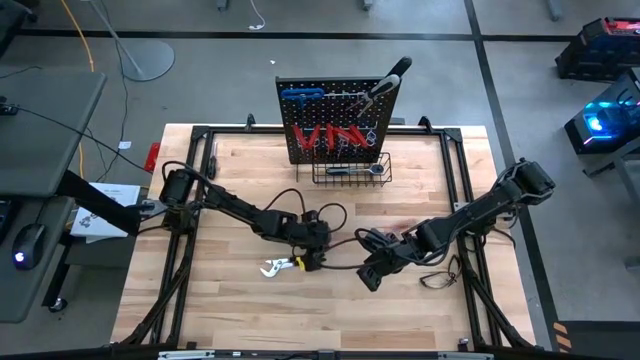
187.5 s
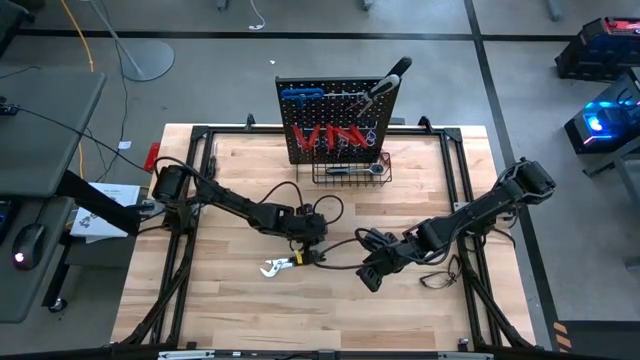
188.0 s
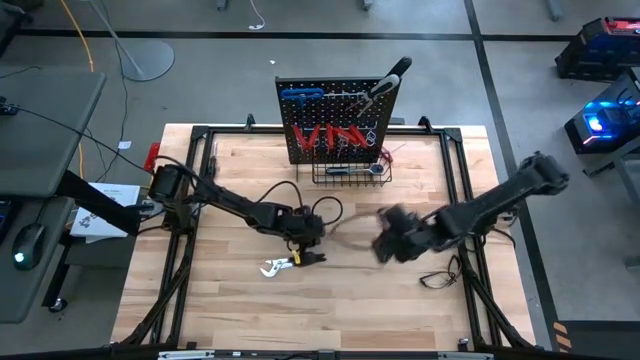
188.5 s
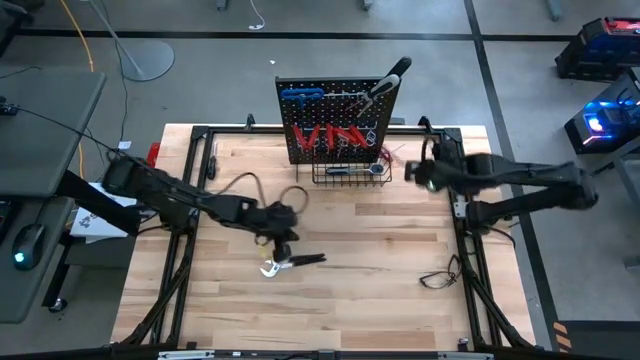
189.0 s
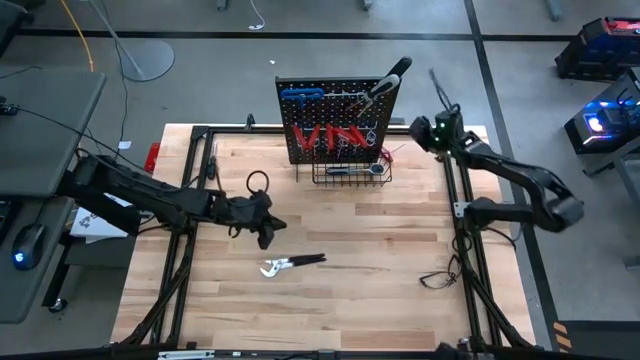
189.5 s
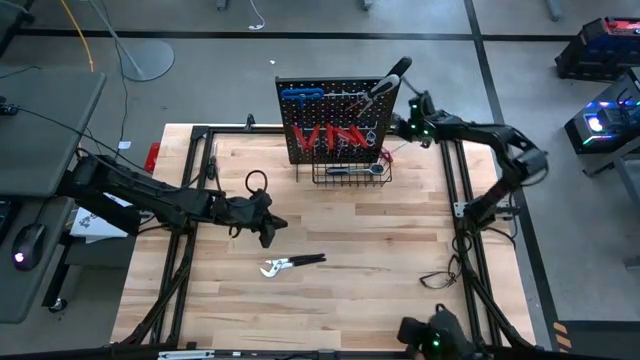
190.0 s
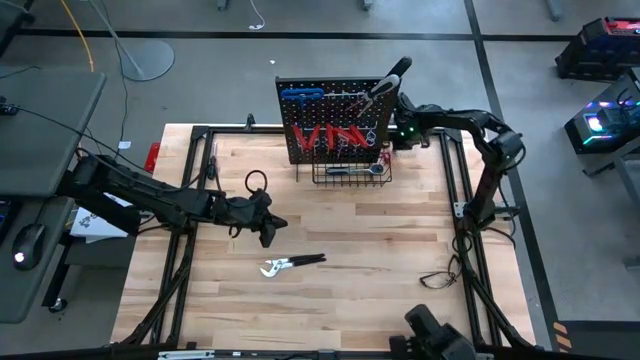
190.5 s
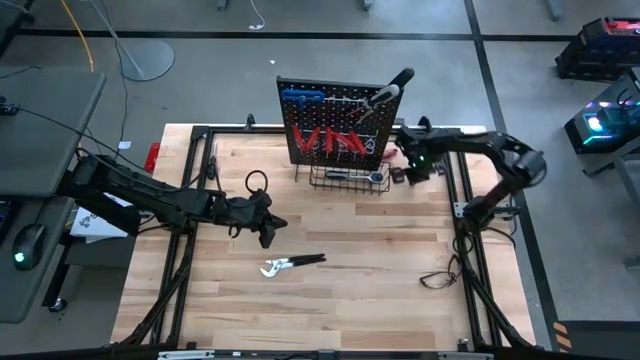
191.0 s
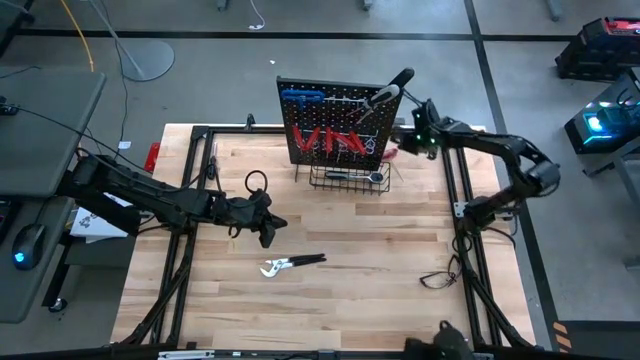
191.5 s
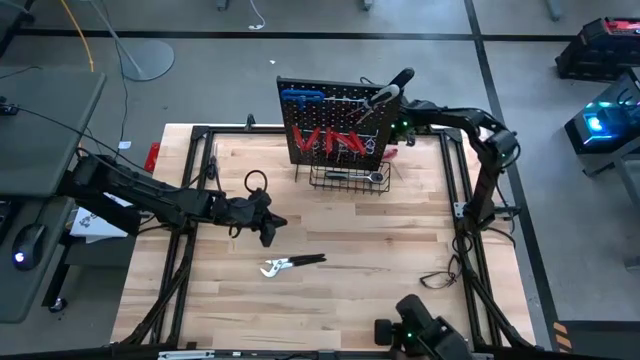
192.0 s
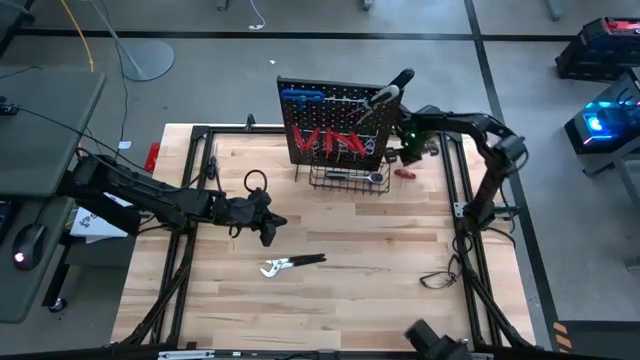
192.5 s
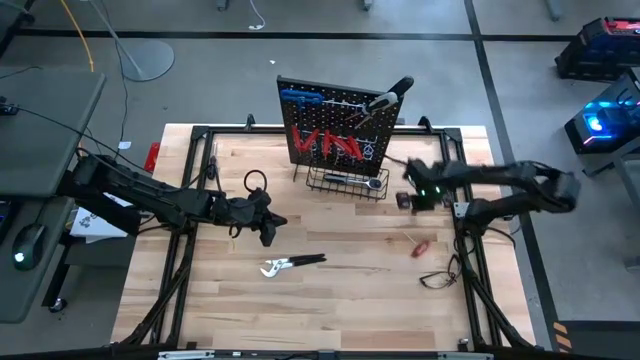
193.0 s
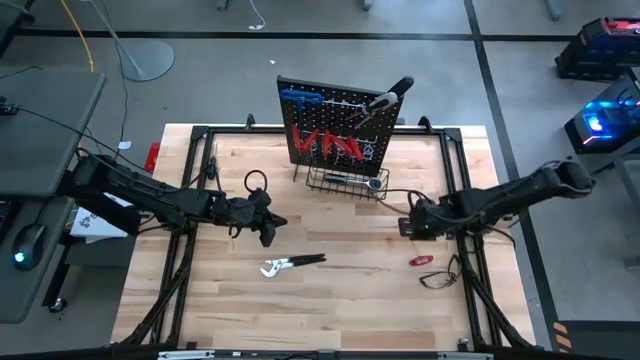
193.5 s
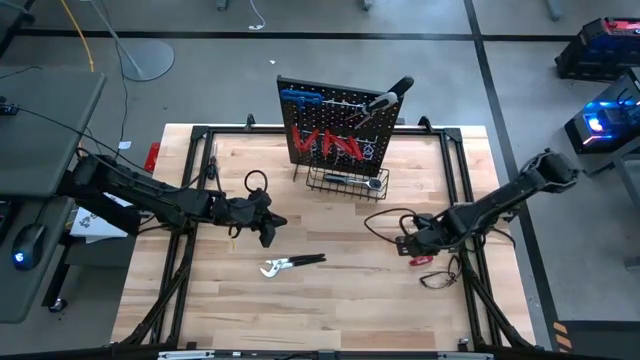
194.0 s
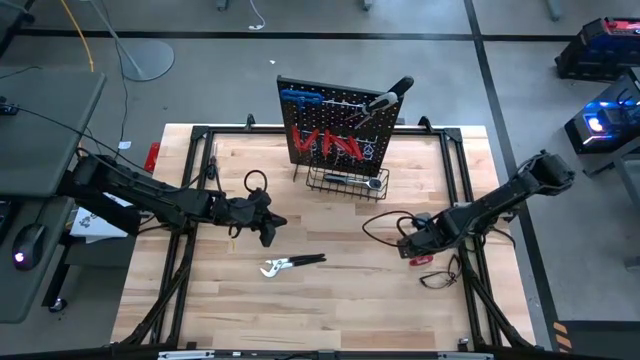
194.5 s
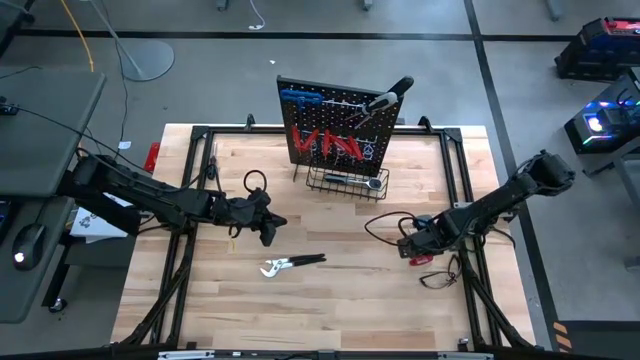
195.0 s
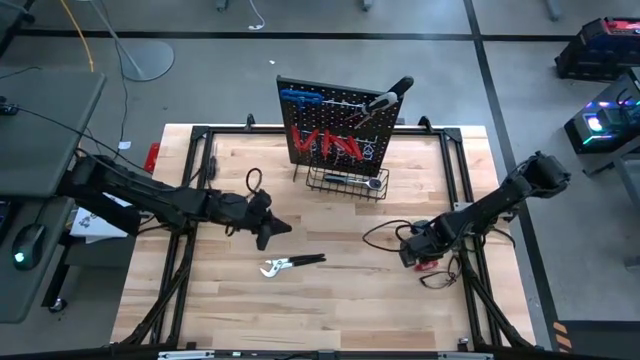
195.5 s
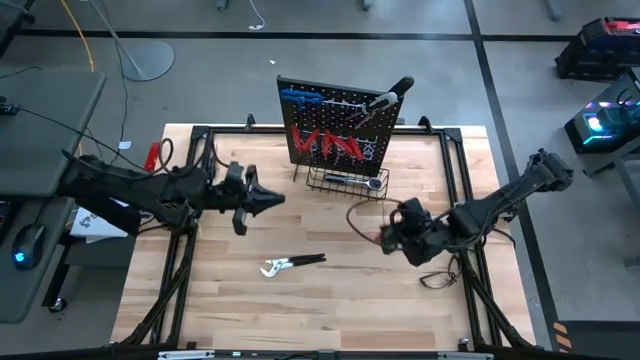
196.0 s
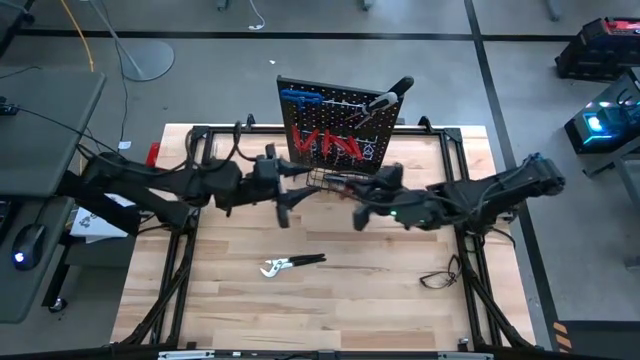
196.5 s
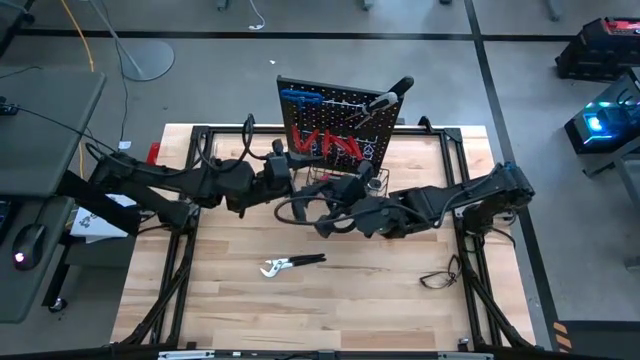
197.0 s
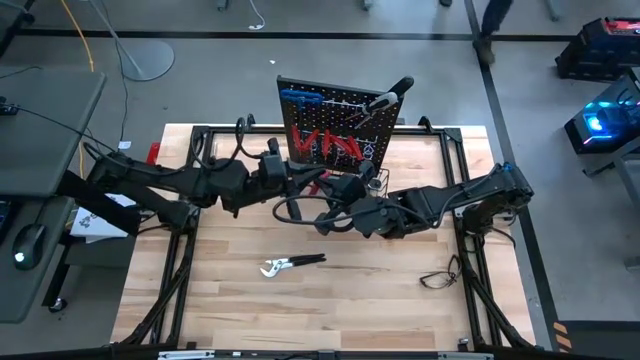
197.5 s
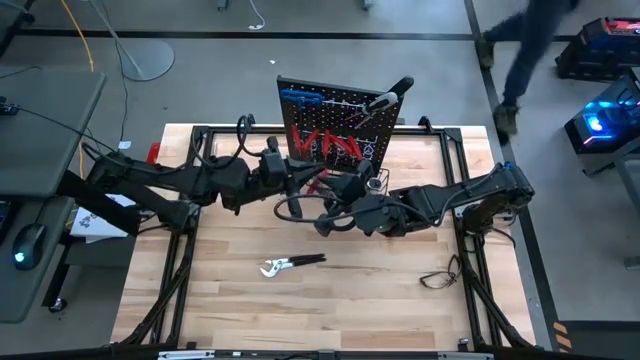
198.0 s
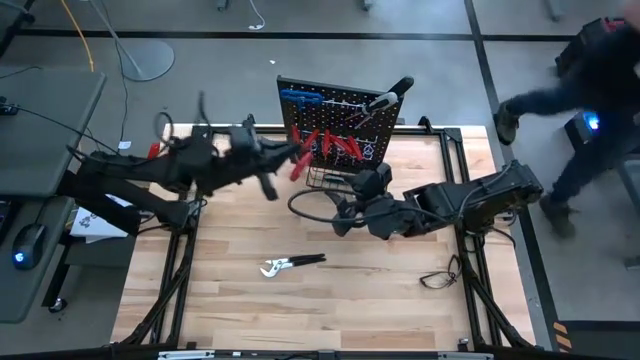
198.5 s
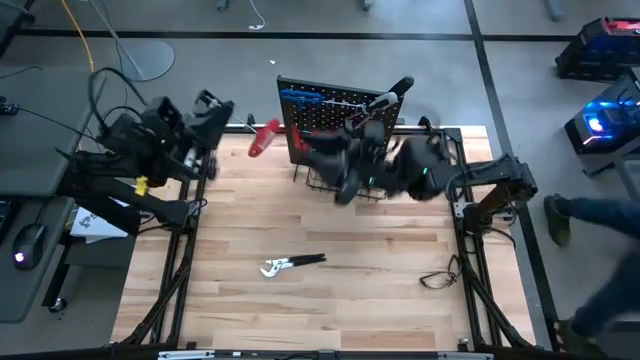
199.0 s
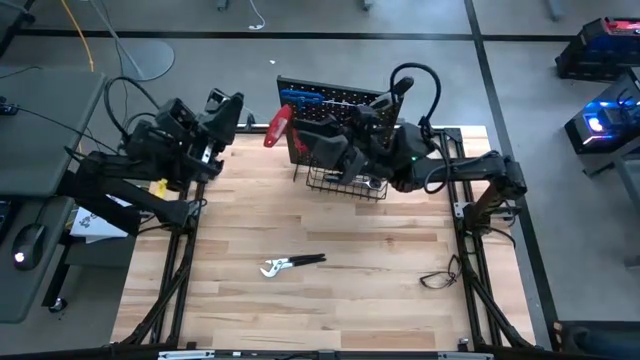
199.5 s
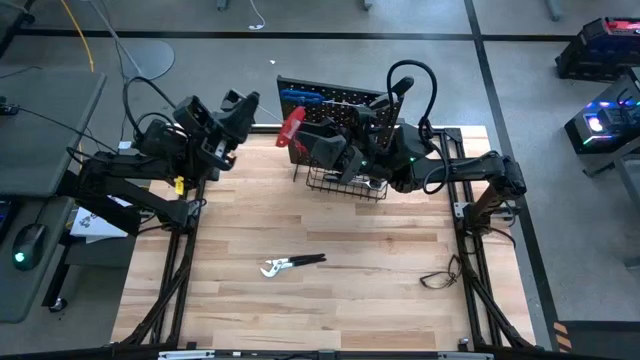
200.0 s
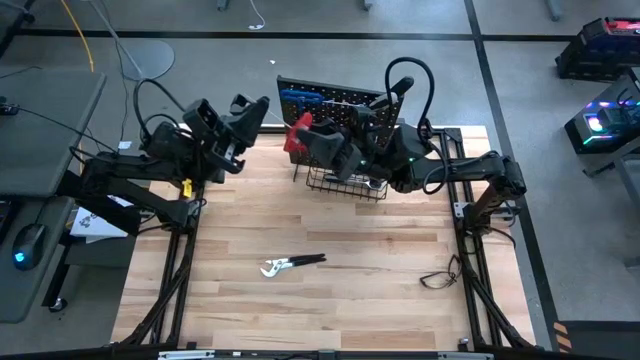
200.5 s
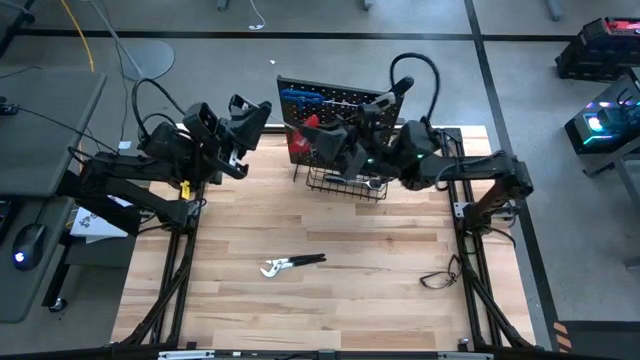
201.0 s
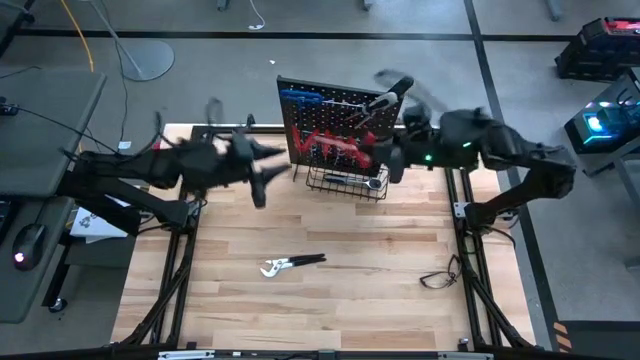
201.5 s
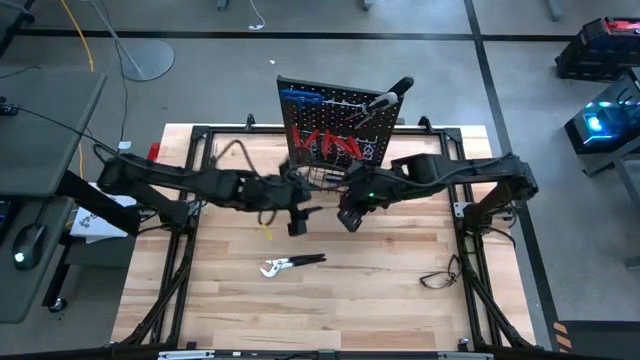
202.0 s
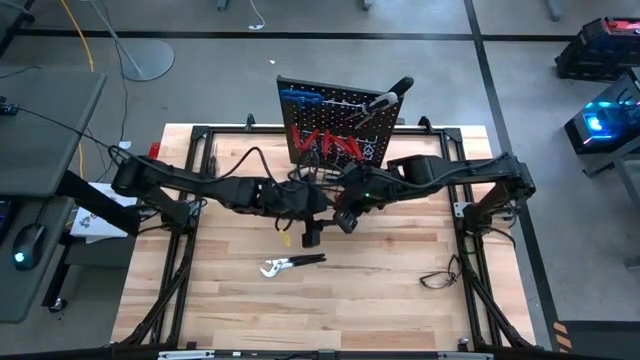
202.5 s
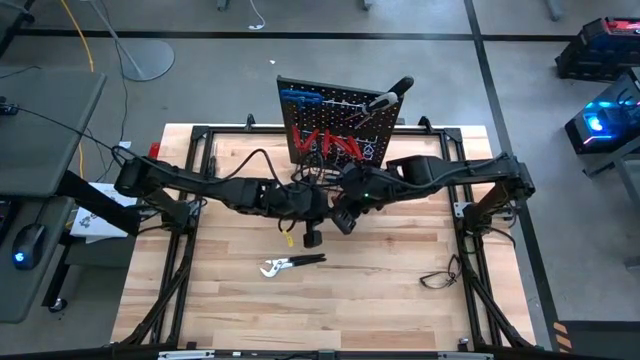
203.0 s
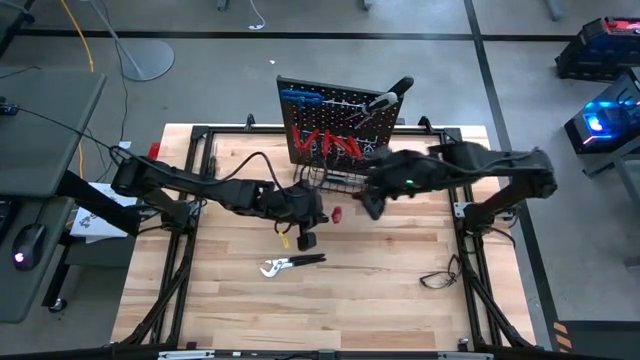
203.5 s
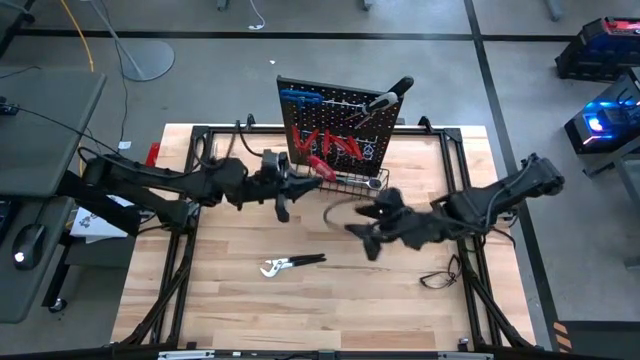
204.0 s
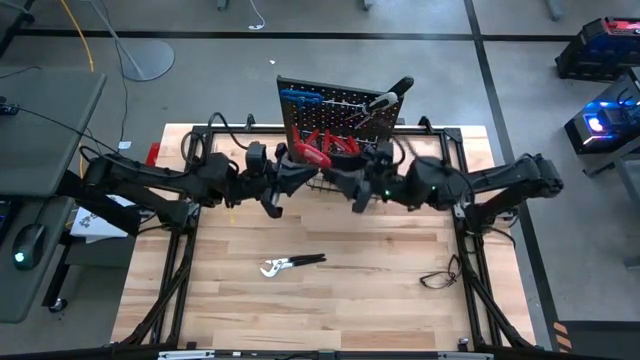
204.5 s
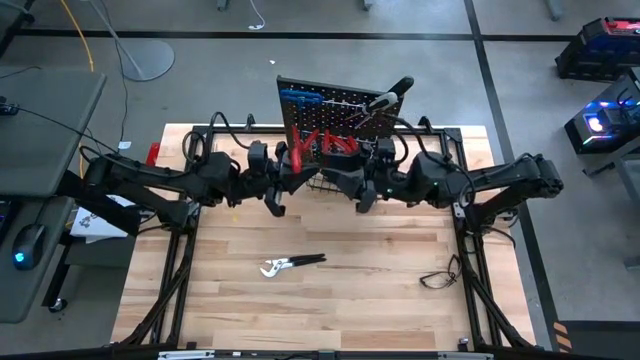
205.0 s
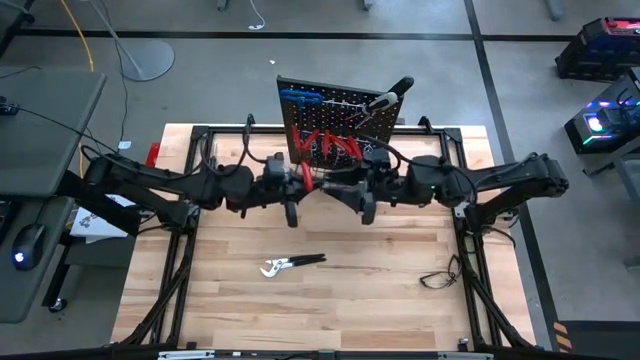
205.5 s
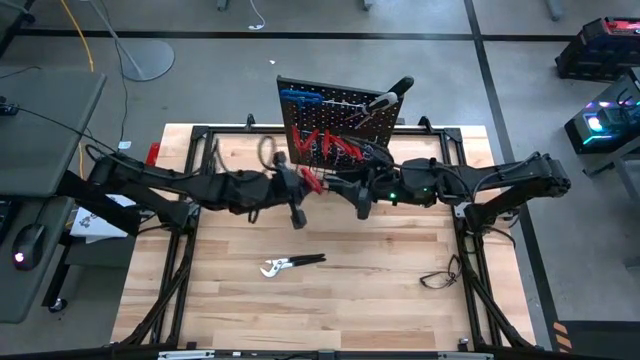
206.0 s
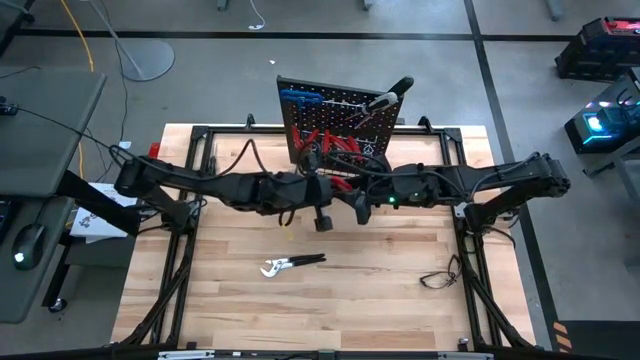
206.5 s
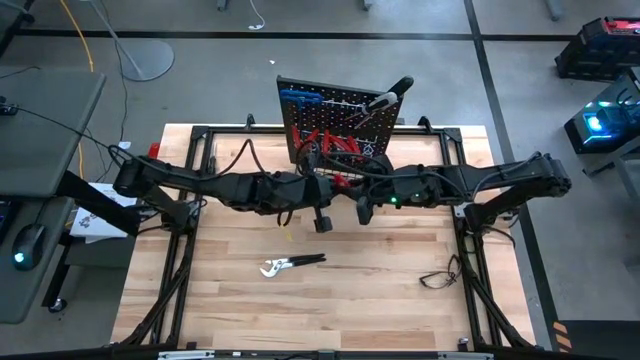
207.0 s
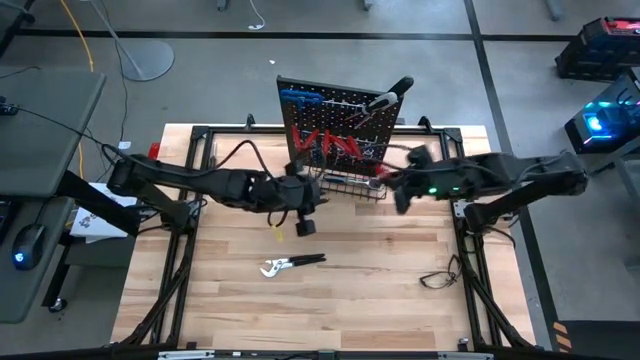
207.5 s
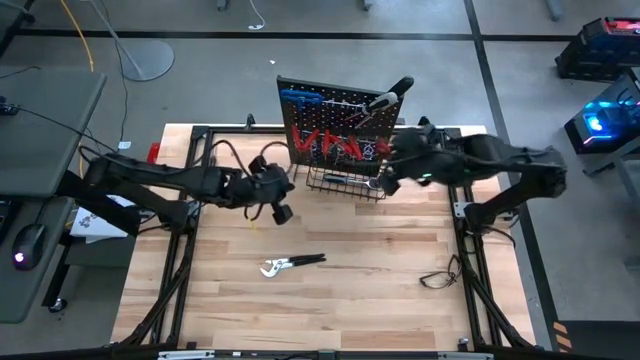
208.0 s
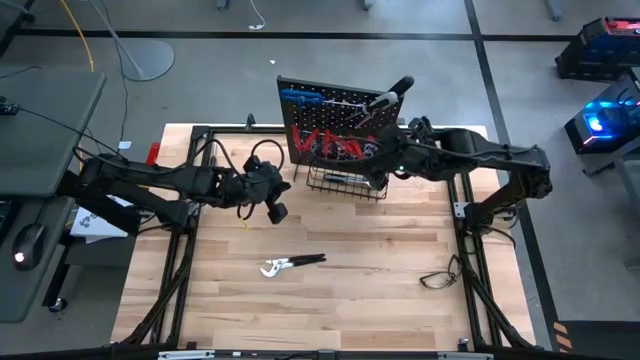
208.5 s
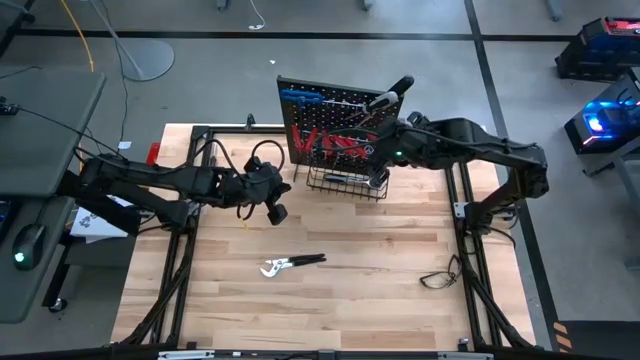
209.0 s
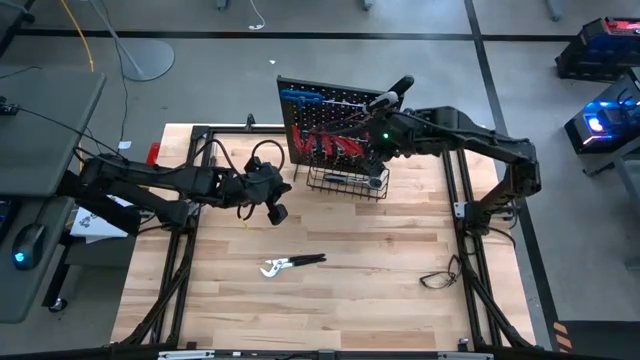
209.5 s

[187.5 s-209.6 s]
Task: Hang tools onto peg board
Hang the red allen wrench on the peg board
